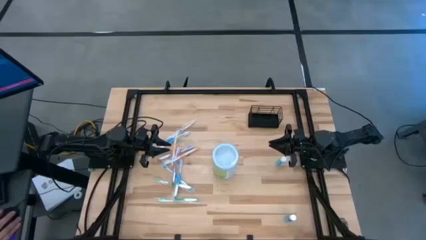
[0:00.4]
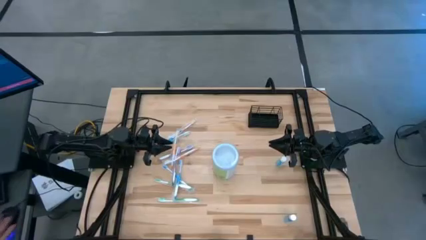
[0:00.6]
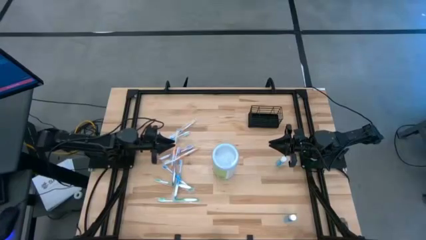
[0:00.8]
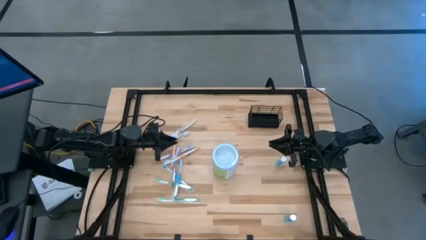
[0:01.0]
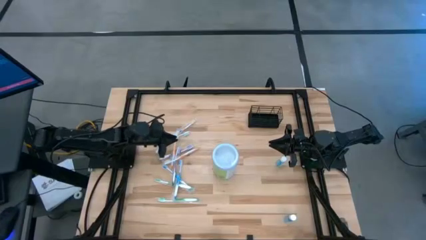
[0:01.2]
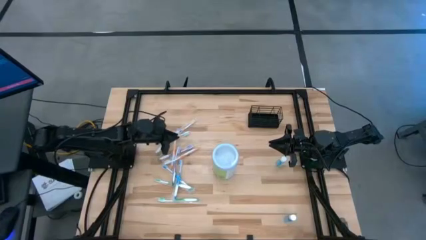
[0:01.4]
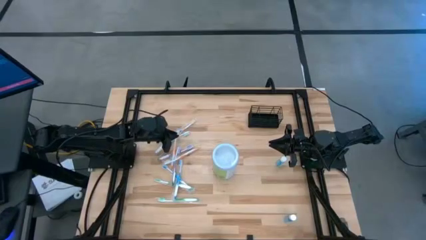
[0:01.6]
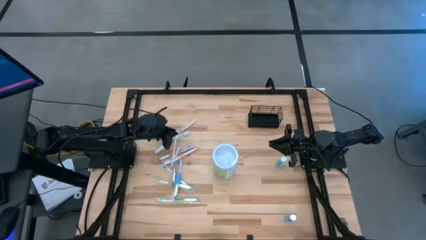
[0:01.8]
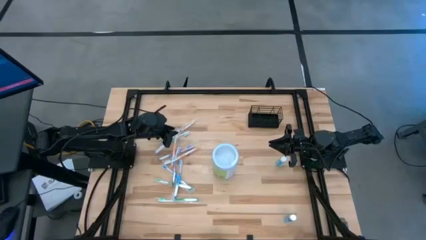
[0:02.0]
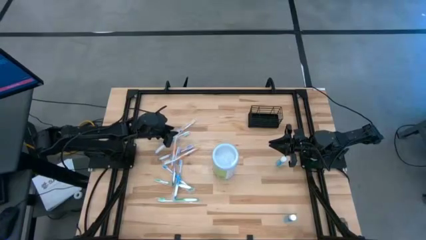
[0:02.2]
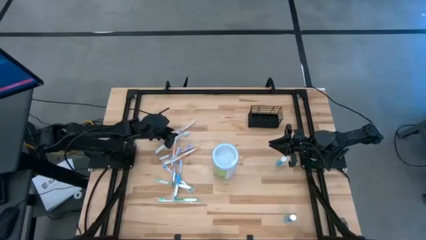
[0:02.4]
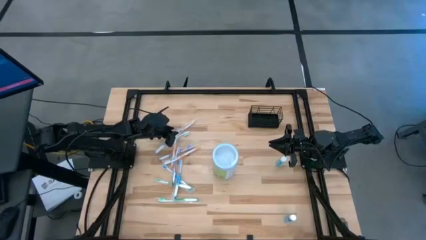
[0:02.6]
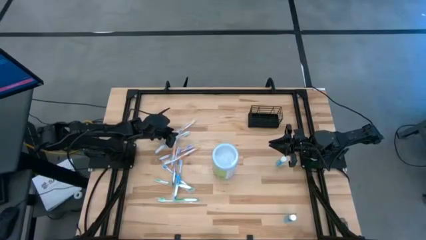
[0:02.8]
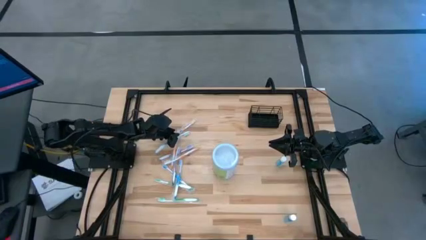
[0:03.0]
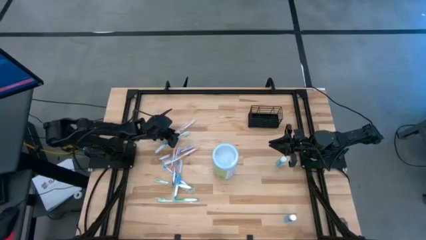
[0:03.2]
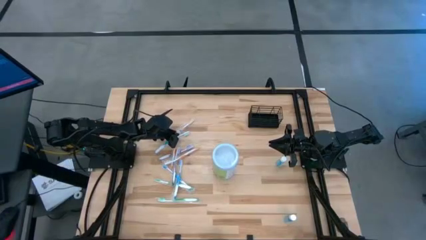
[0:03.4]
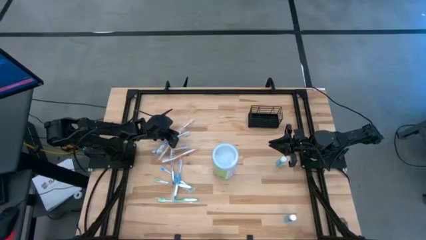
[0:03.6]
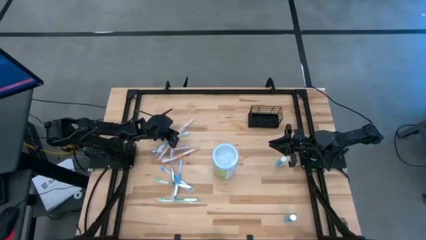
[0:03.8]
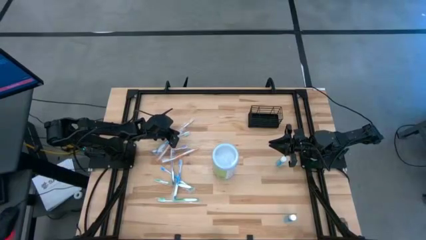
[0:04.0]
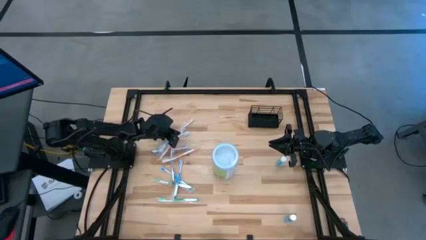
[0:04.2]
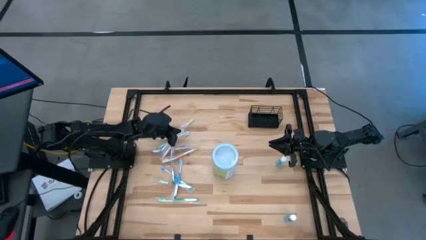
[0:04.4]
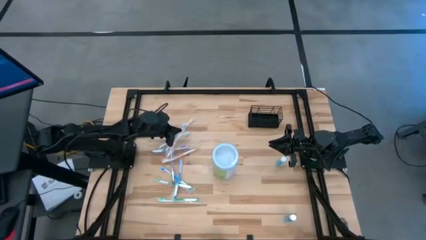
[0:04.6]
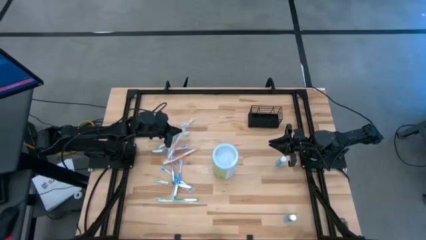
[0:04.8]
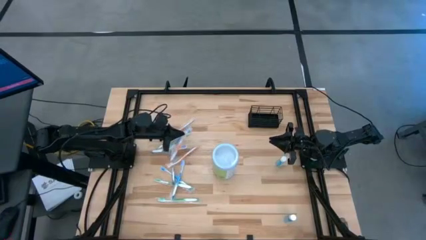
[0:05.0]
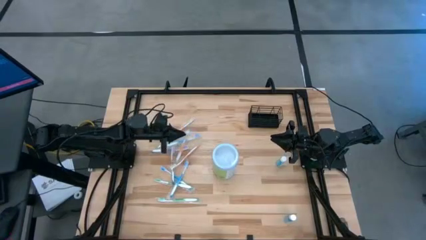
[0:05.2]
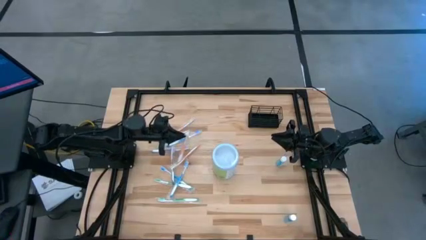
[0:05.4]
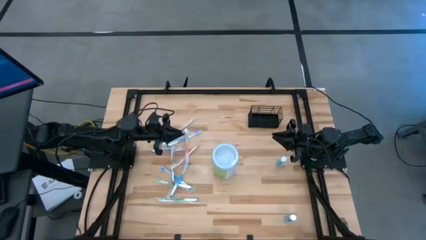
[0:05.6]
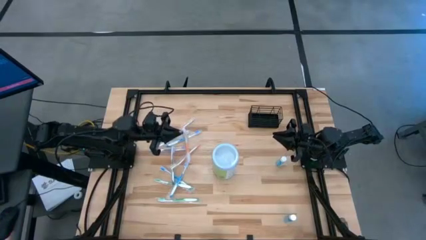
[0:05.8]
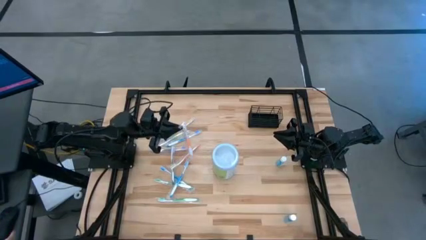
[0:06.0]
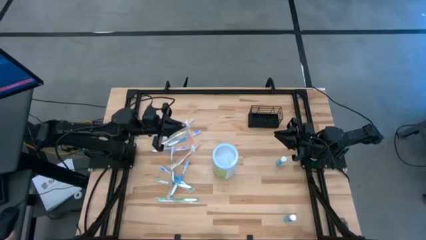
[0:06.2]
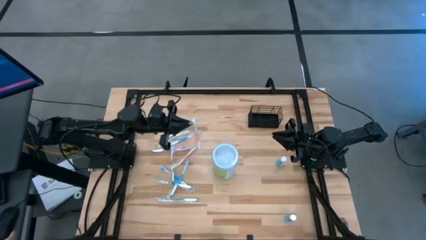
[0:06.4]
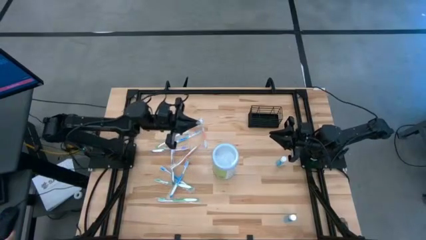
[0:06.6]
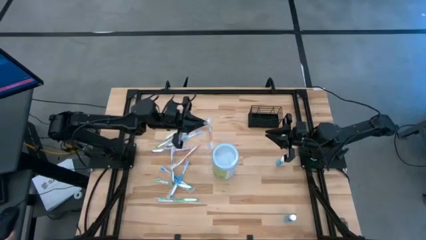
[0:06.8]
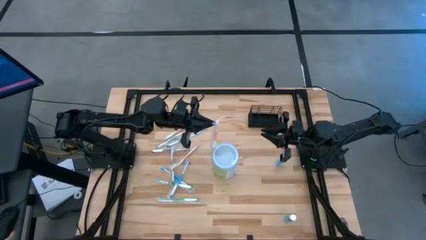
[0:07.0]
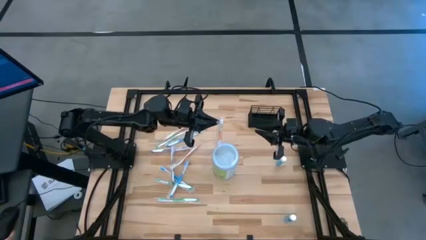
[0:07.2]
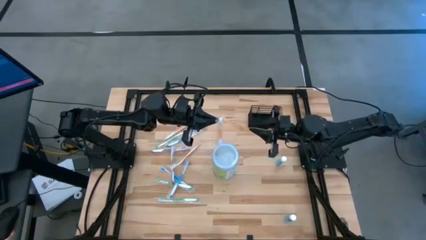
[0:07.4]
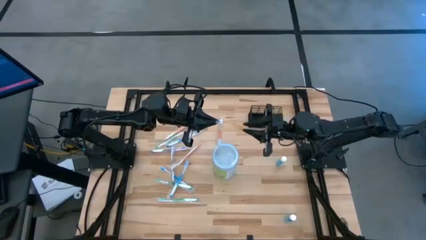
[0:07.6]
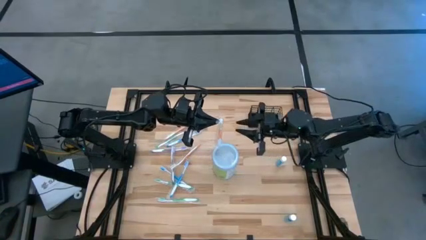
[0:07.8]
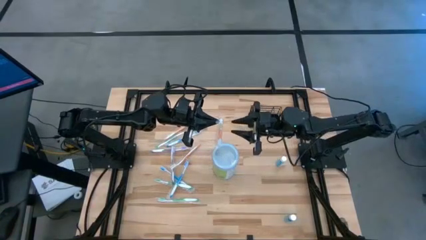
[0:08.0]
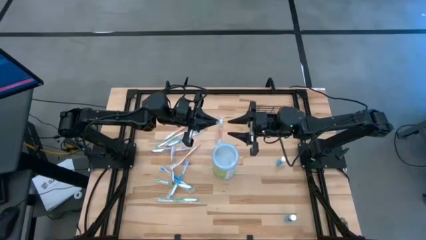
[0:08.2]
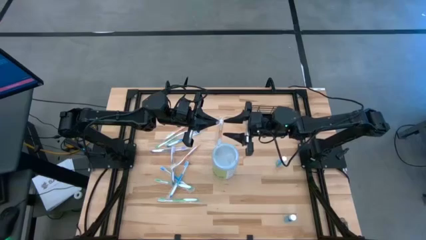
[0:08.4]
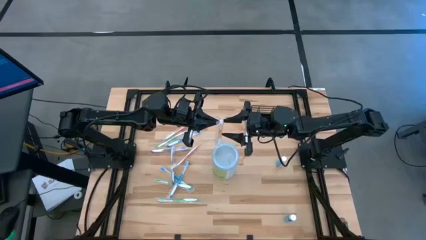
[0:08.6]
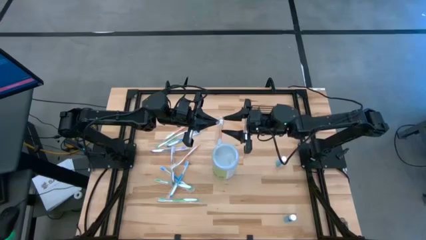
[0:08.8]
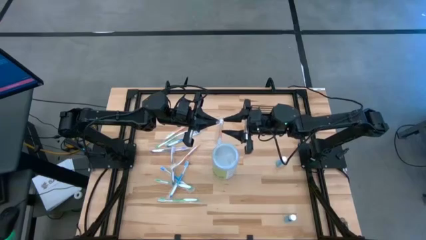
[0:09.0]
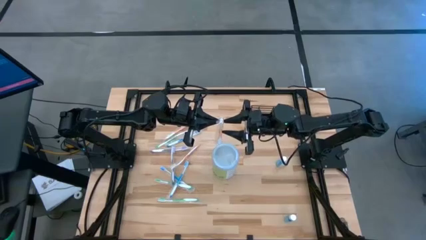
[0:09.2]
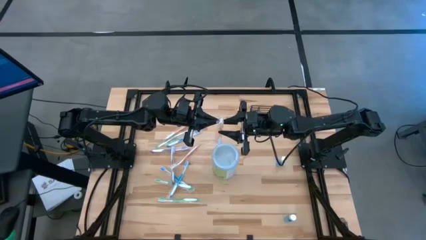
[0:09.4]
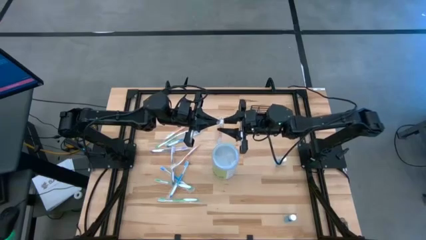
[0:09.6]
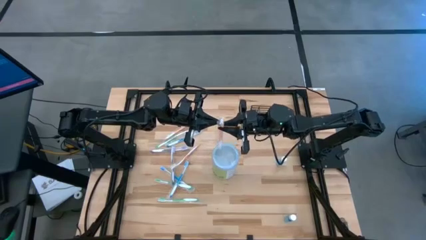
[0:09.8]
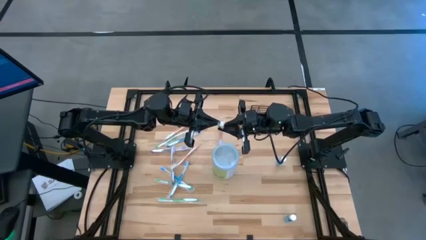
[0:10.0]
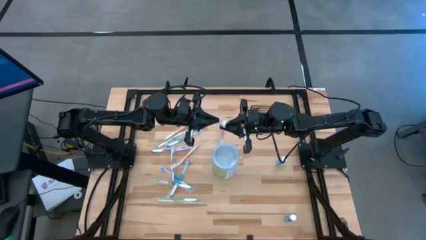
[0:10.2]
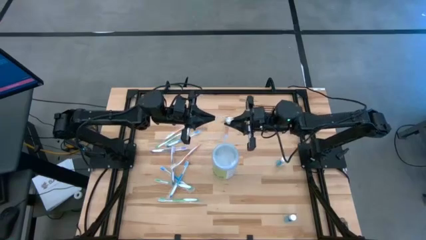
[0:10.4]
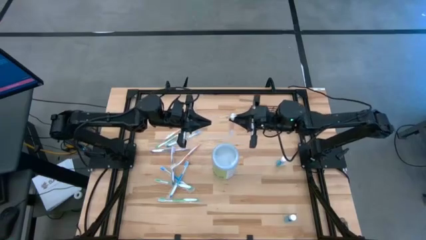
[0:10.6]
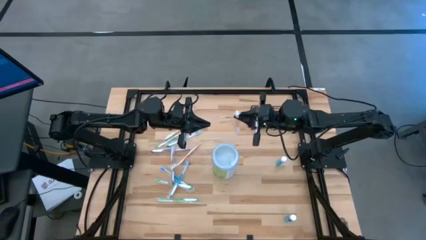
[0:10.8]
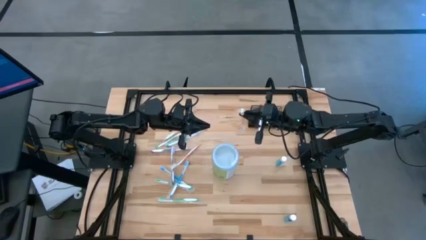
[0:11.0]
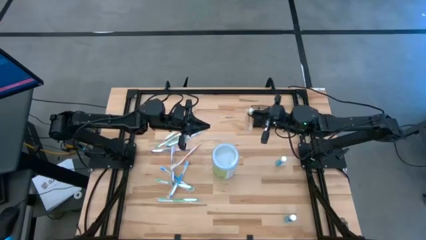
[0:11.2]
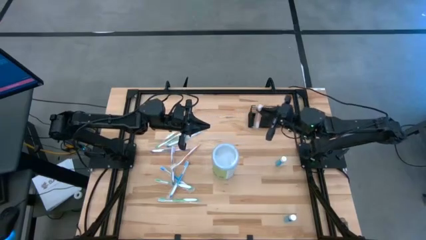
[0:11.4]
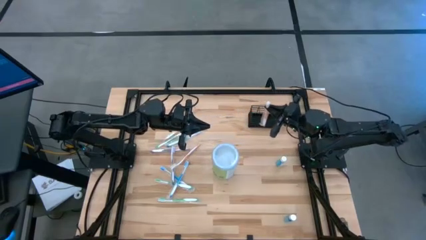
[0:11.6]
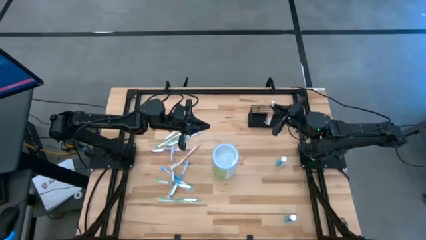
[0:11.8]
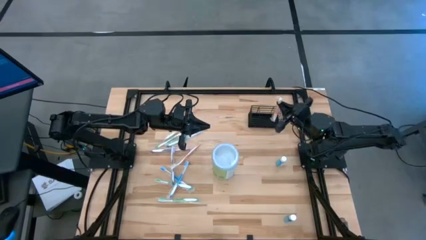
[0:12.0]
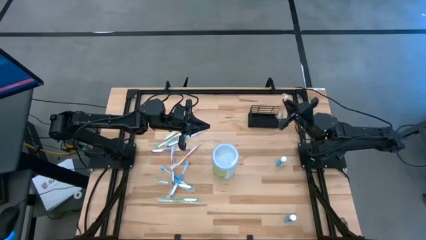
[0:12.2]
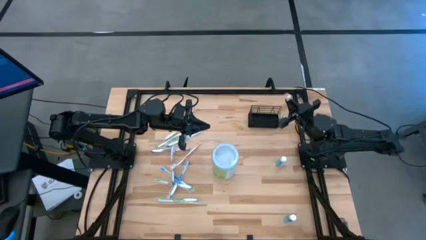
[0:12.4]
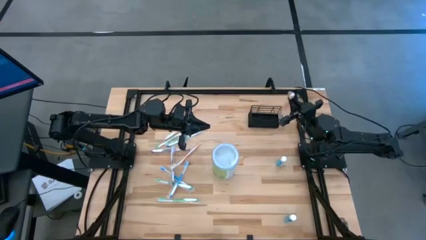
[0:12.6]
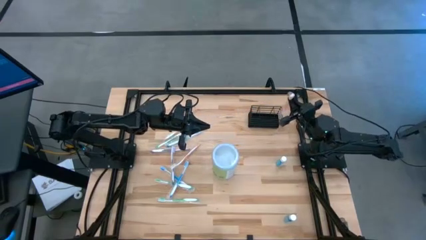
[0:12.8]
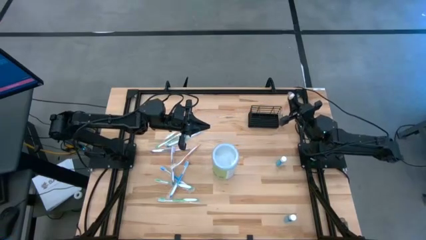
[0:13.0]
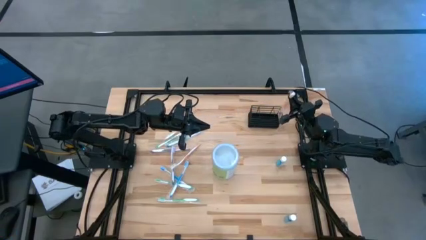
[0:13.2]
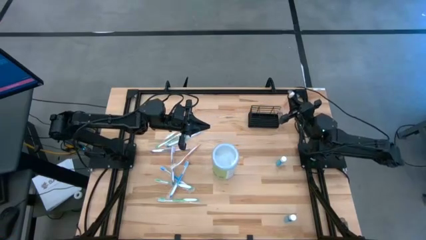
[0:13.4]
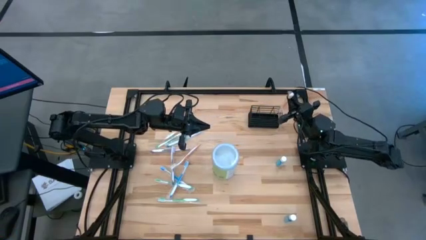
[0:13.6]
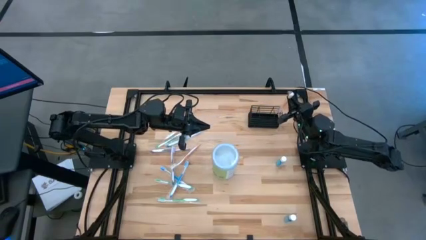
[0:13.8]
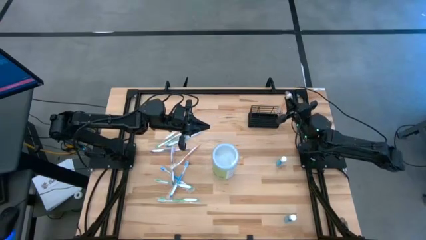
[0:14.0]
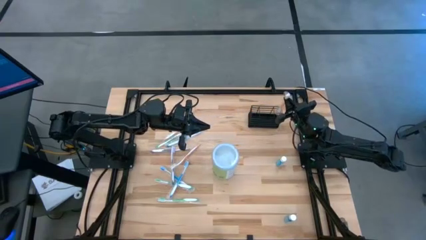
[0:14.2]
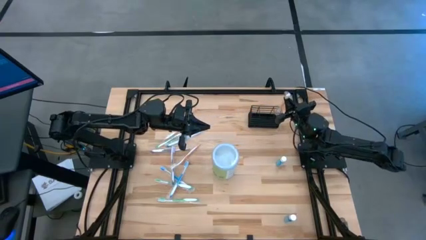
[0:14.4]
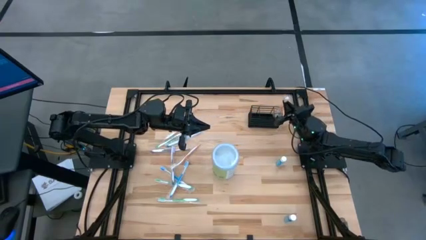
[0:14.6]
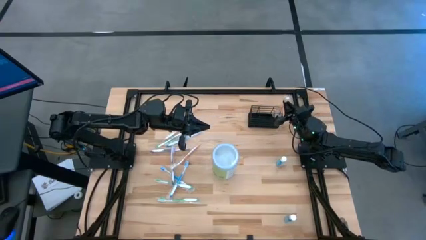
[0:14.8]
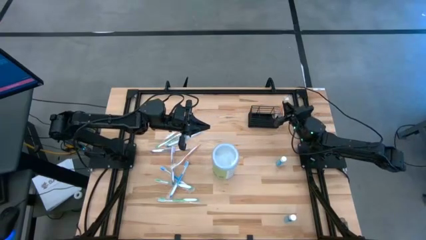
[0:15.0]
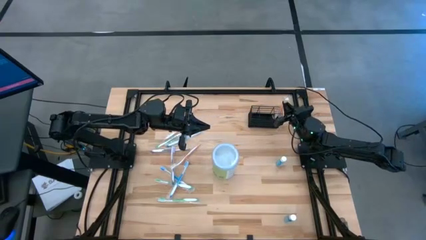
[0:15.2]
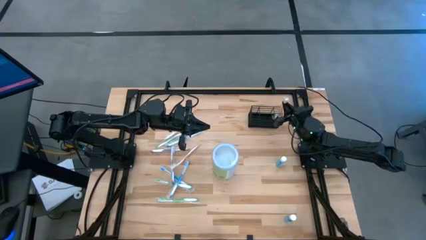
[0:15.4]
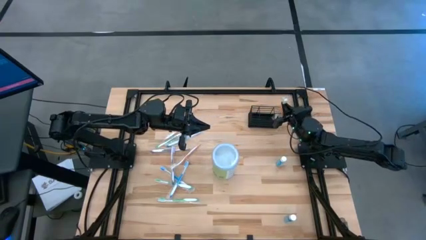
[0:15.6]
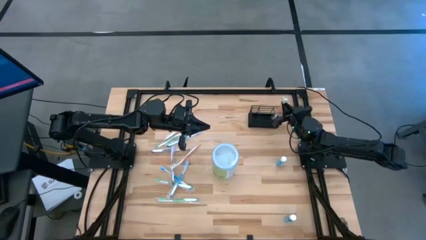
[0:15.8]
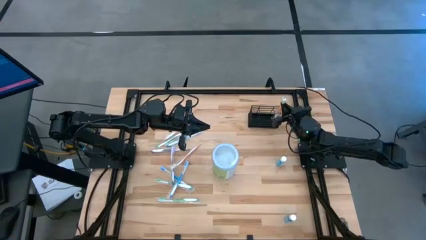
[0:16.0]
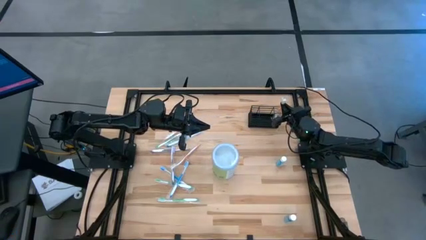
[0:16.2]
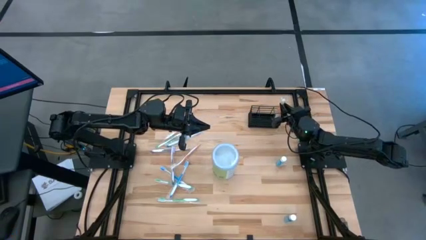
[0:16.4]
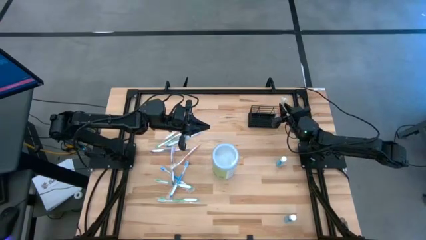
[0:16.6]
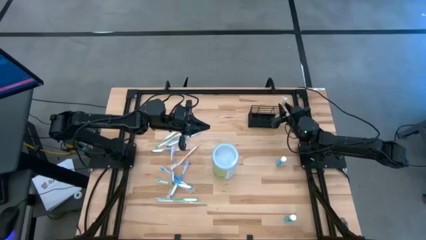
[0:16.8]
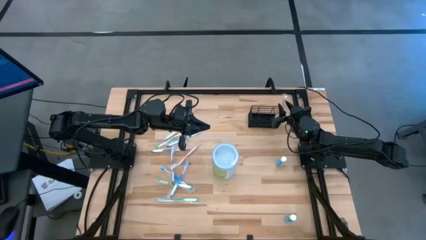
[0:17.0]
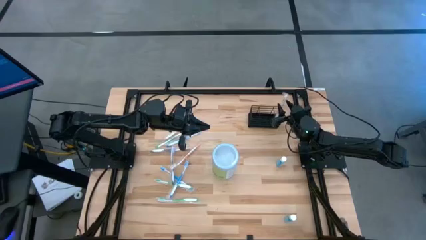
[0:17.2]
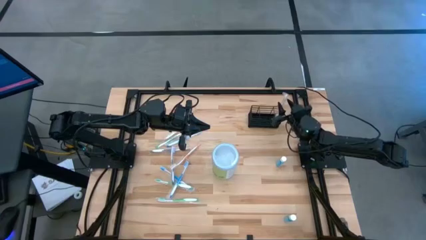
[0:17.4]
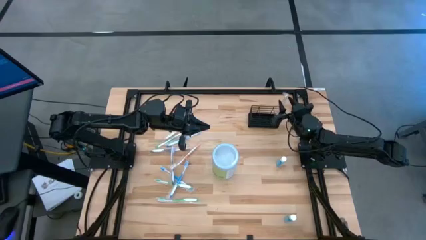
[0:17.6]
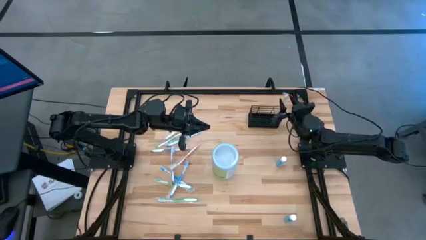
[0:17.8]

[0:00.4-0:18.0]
Task: Pick & Place toothbrushing station
Put the orange toothbrush into the wire organizer
